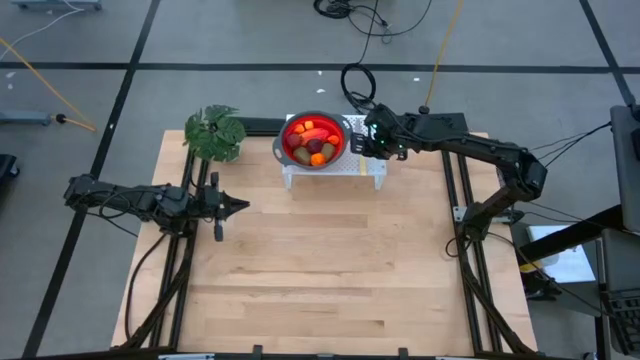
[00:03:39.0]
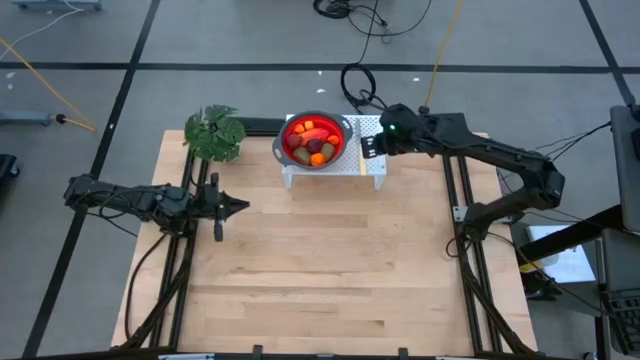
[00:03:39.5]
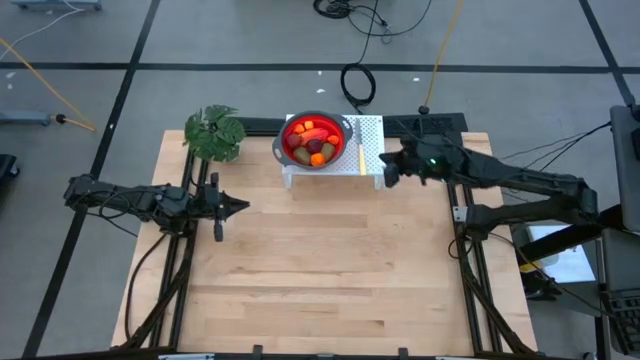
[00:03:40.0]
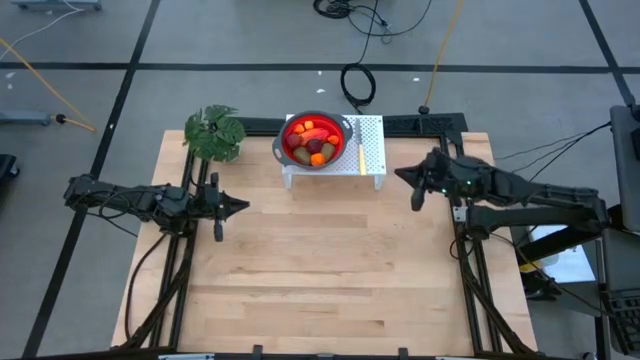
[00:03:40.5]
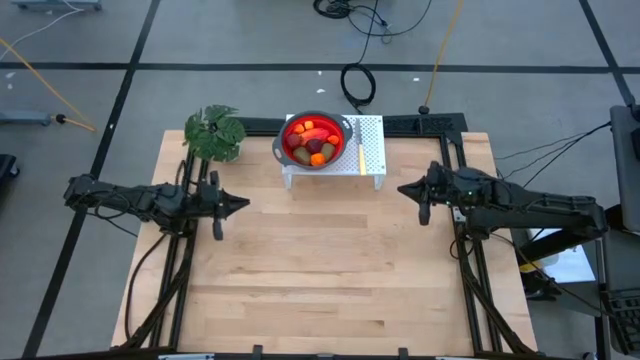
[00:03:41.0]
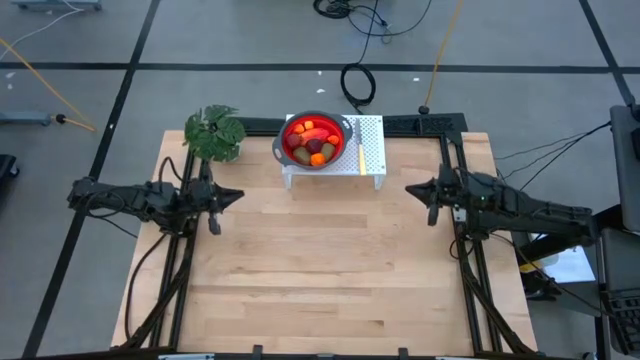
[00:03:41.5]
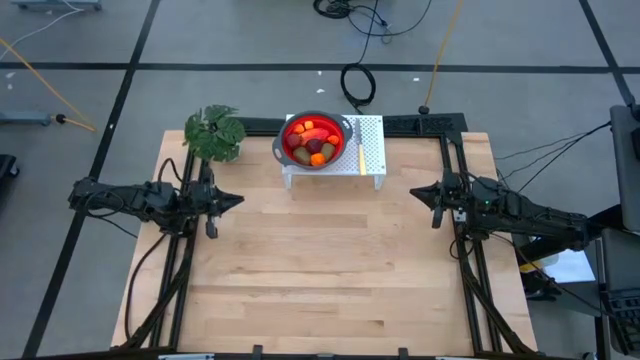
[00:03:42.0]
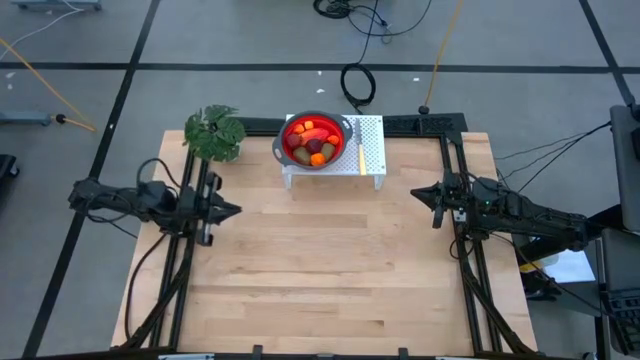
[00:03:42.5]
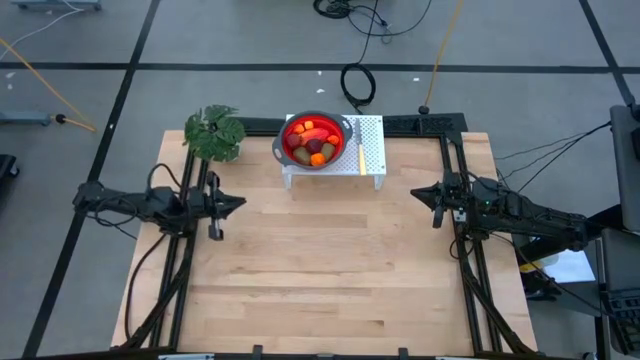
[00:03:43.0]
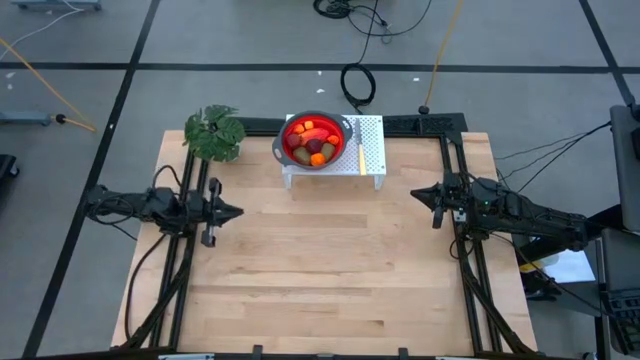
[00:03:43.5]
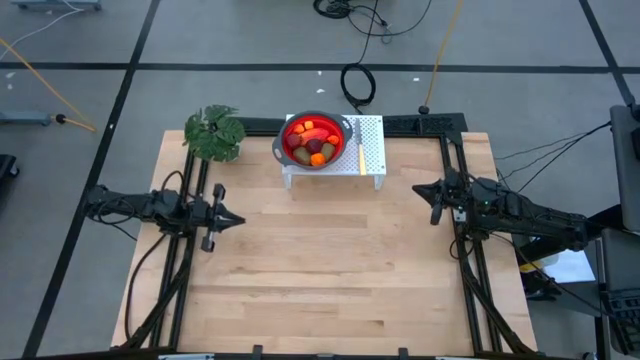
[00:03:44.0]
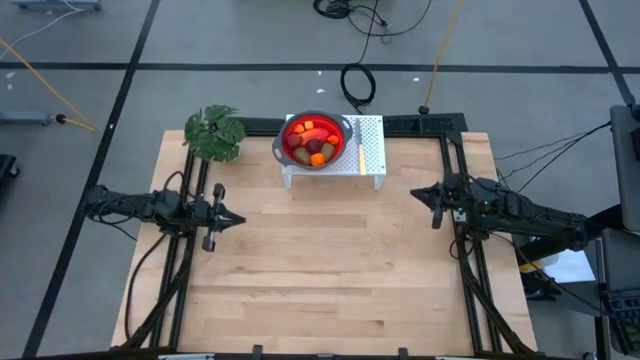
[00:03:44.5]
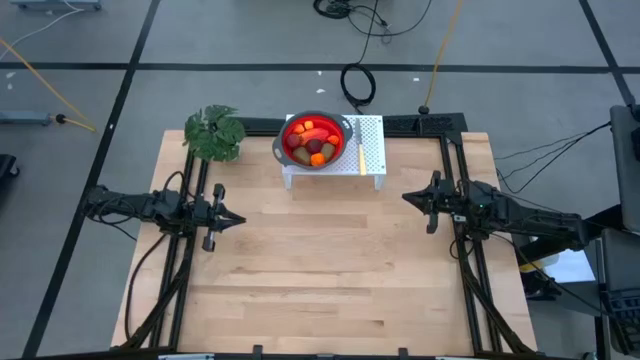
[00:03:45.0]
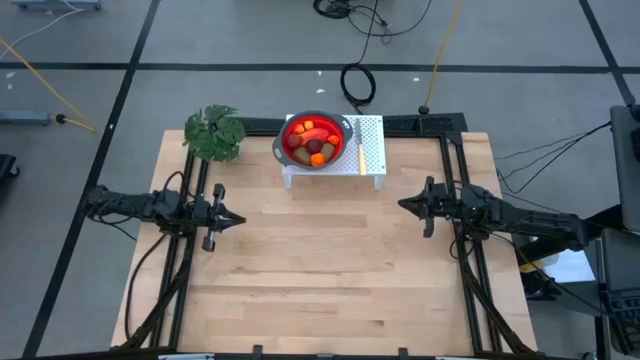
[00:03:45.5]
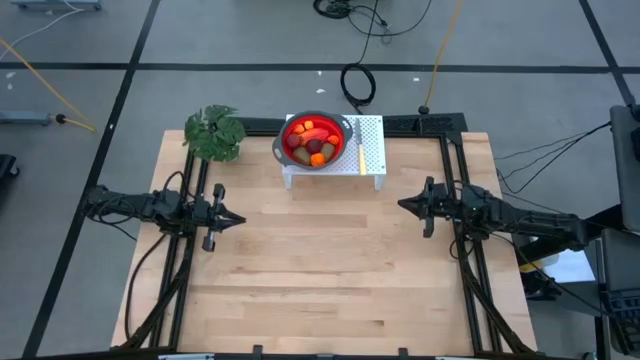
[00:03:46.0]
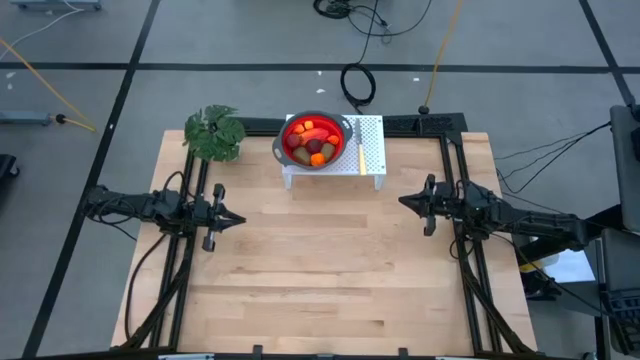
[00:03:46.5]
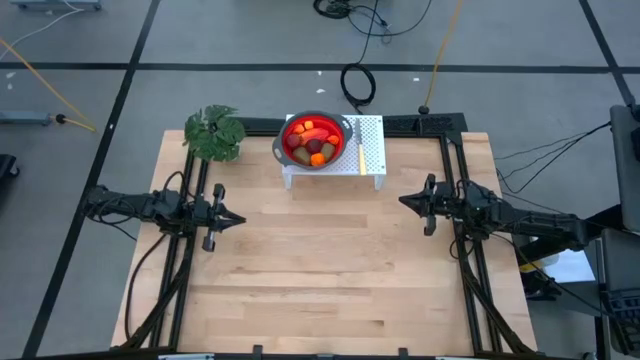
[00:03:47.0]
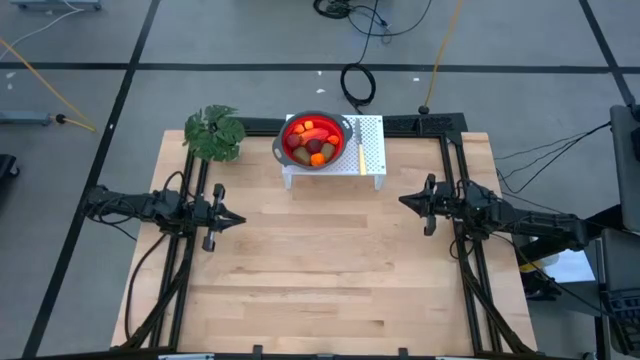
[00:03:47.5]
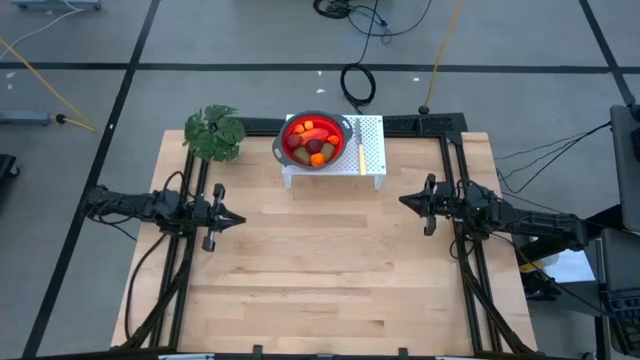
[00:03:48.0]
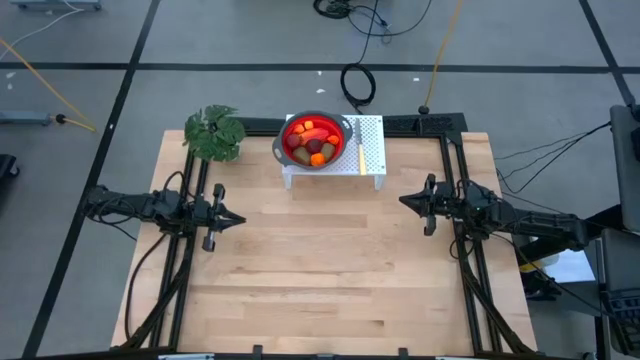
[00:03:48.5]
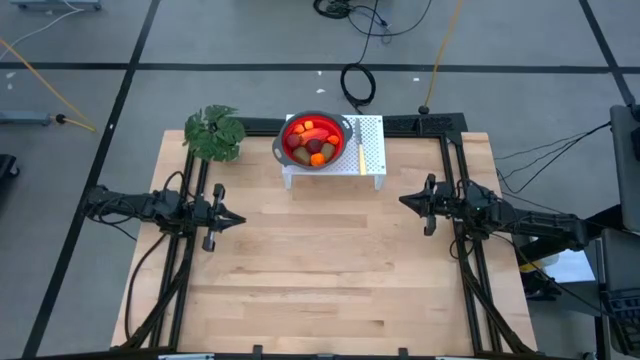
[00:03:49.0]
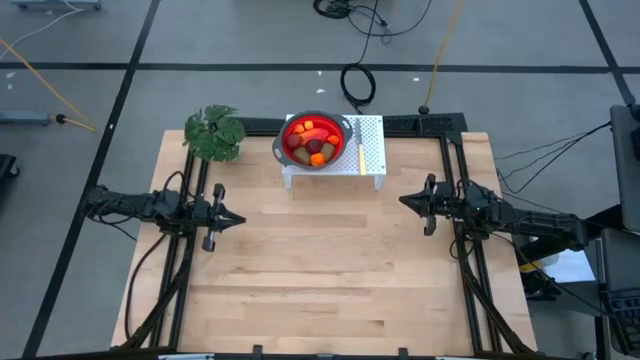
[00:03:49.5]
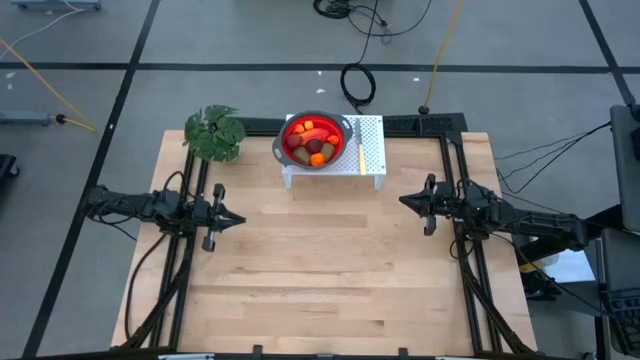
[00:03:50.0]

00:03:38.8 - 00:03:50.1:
Task: Pick & Place Fruit
Return to Home Position

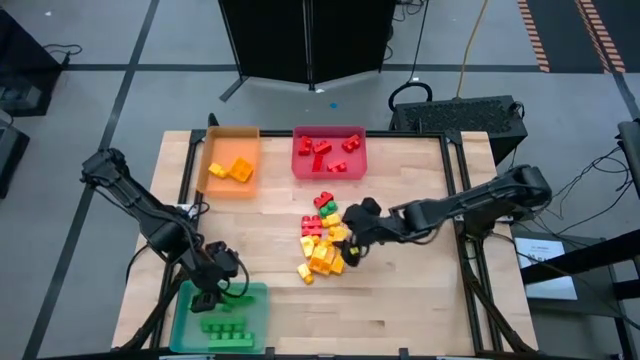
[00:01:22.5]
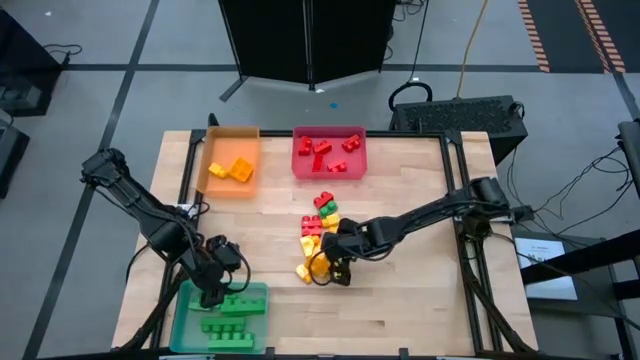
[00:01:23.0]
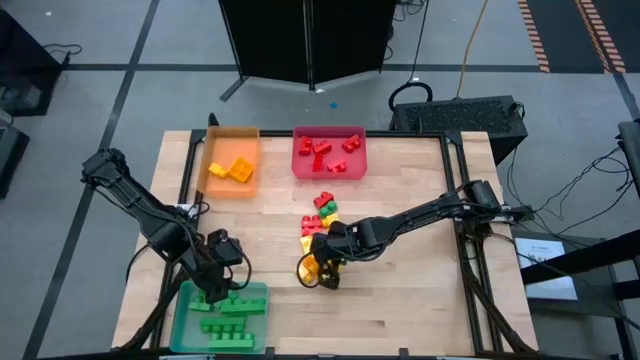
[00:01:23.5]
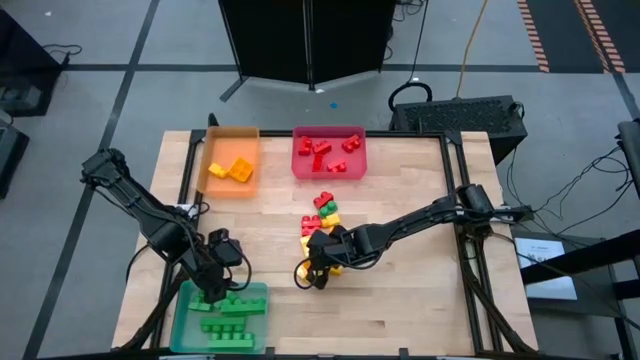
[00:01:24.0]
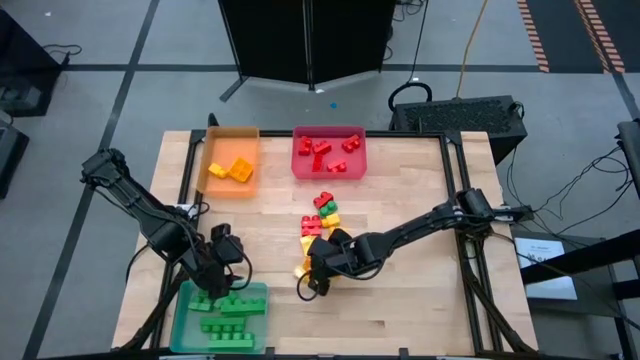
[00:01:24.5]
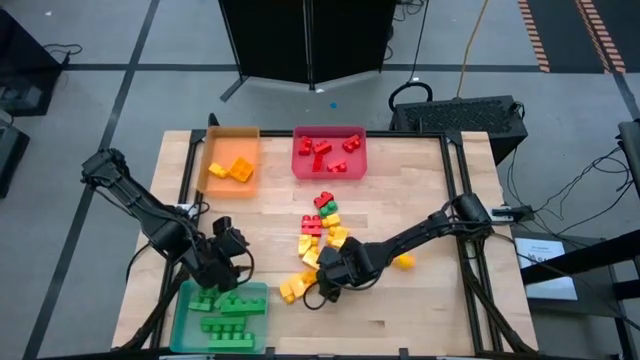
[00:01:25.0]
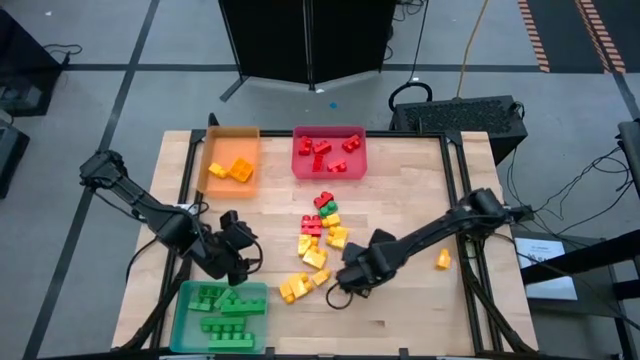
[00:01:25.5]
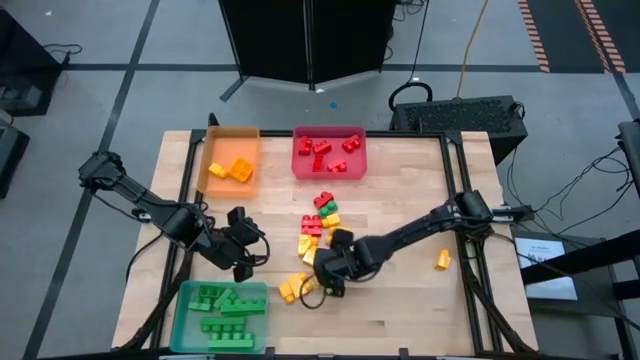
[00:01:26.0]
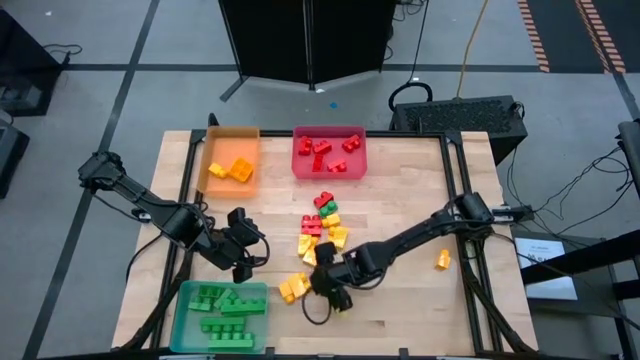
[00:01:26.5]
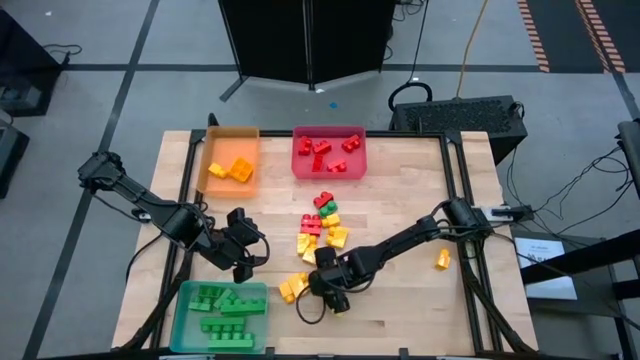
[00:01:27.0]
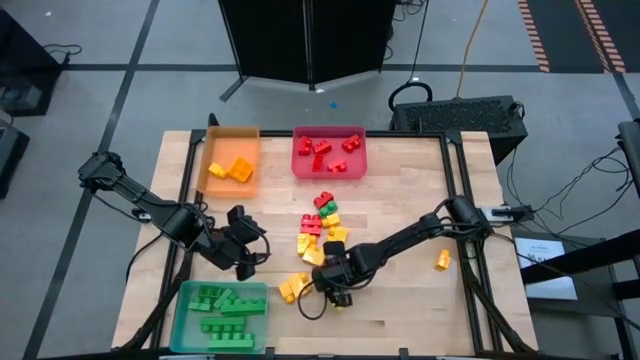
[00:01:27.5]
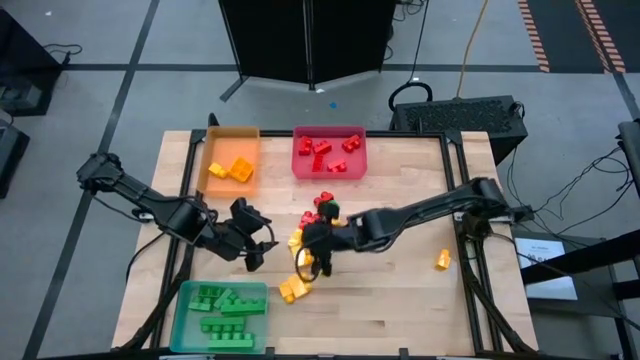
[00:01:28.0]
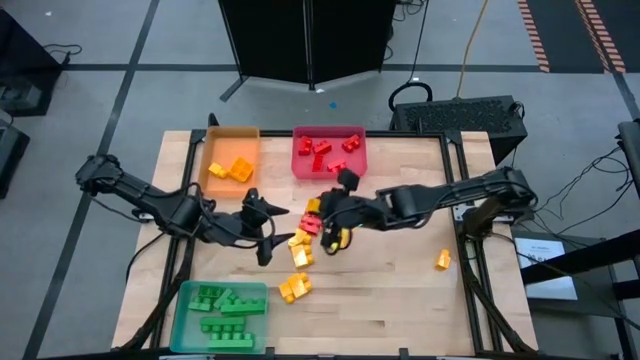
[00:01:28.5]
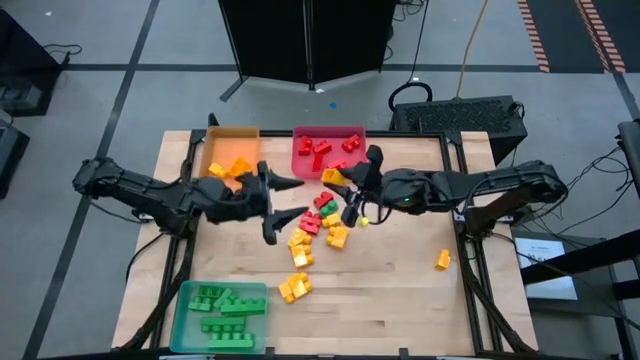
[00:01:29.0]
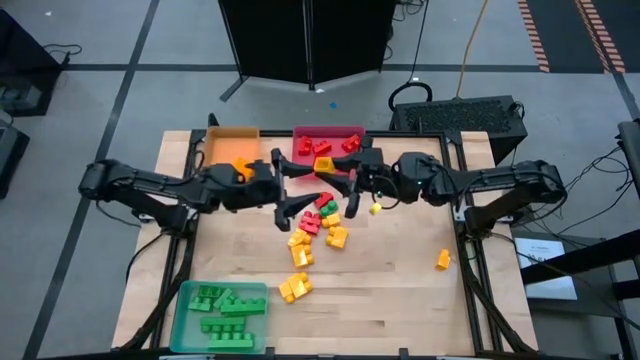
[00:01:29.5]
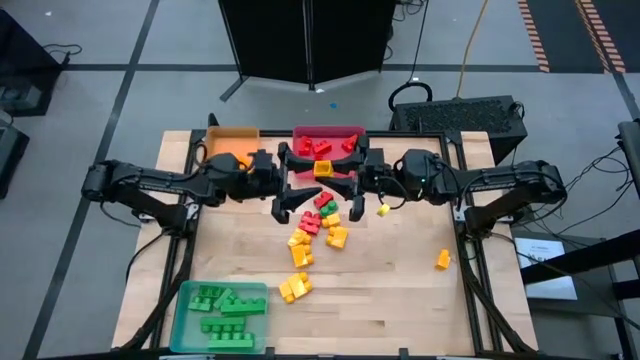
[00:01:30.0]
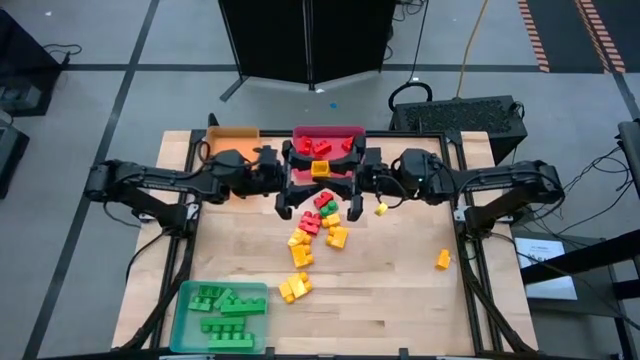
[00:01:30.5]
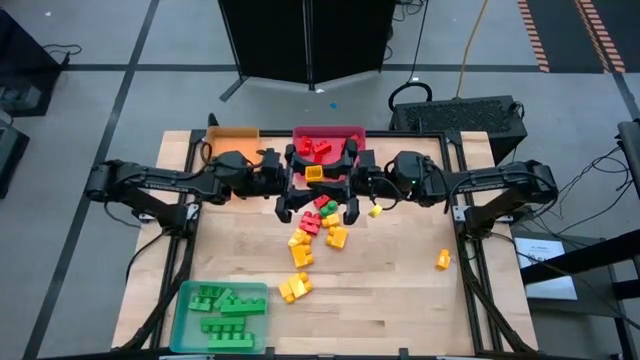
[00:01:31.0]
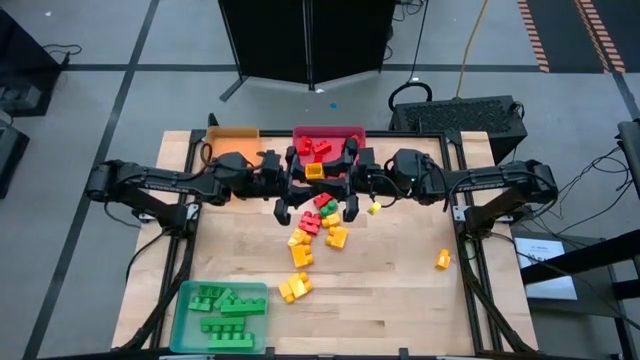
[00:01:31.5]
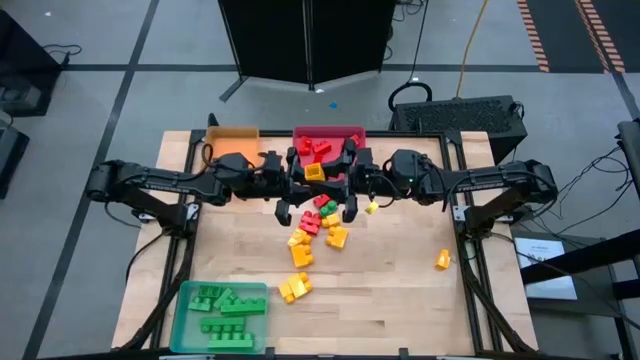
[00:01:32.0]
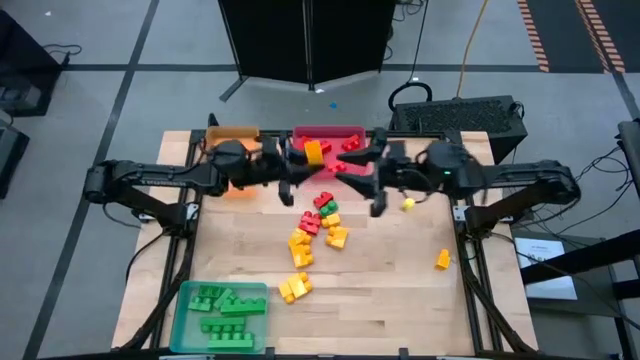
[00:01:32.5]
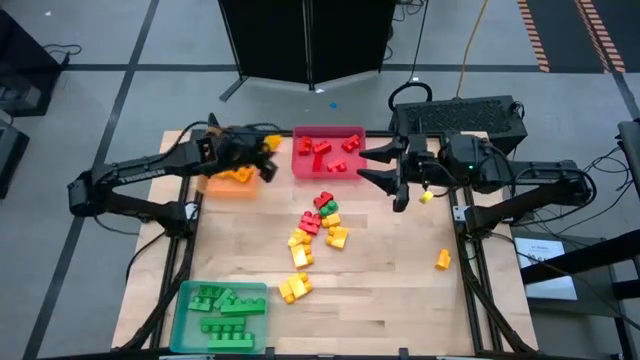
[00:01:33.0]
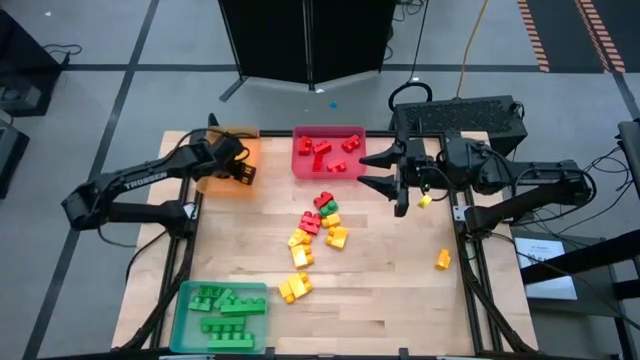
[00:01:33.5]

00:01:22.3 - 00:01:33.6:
Task: Sort blocks
Put the yellow game piece into the yellow bin
